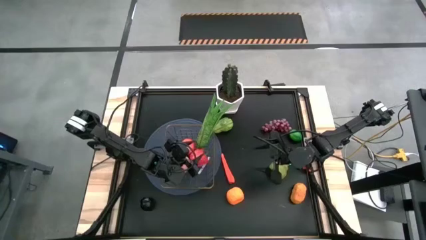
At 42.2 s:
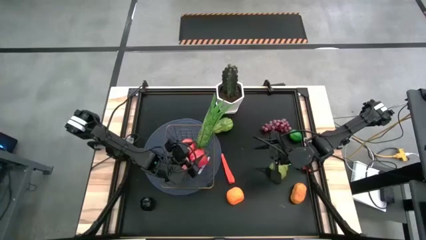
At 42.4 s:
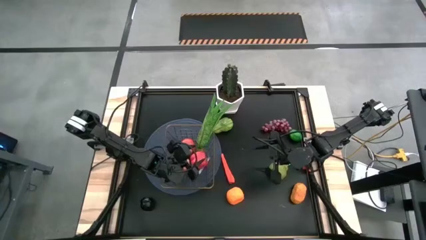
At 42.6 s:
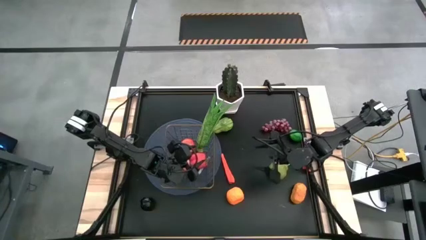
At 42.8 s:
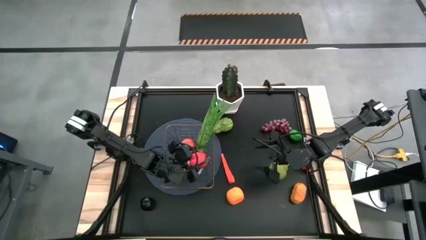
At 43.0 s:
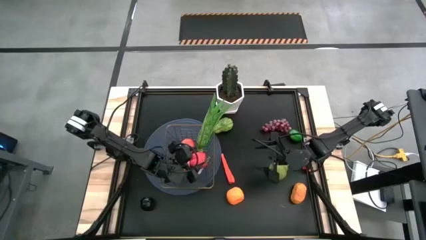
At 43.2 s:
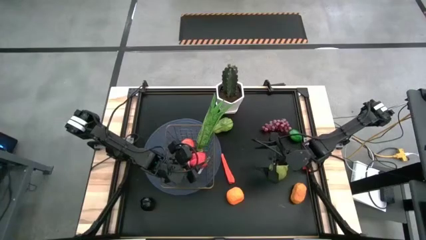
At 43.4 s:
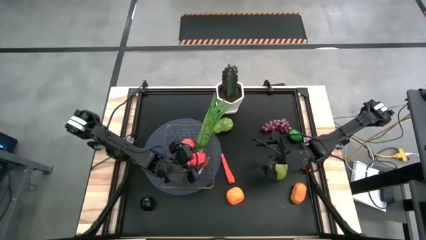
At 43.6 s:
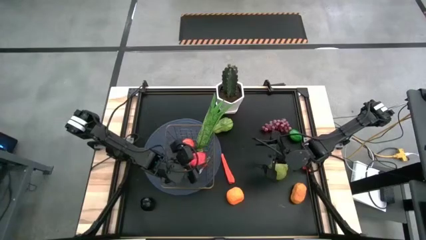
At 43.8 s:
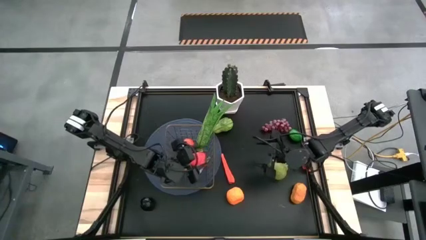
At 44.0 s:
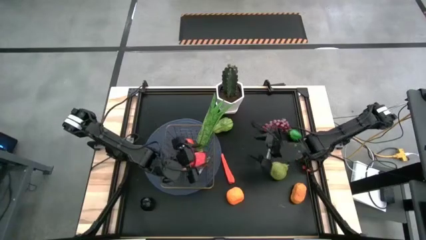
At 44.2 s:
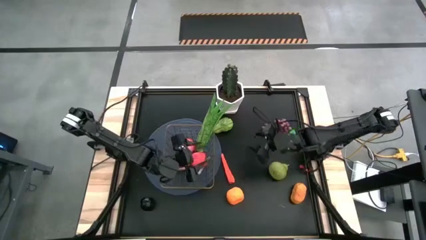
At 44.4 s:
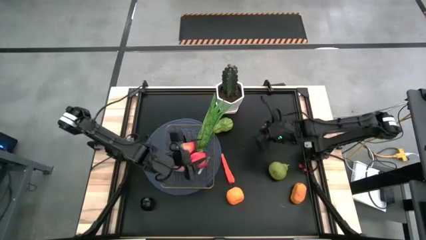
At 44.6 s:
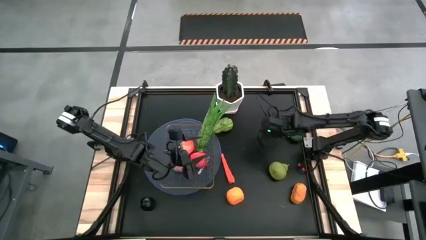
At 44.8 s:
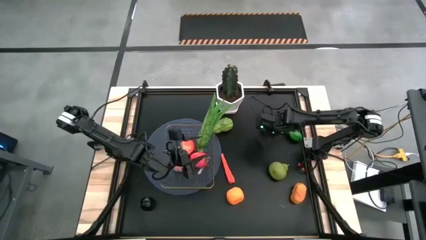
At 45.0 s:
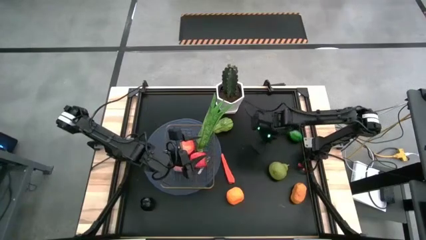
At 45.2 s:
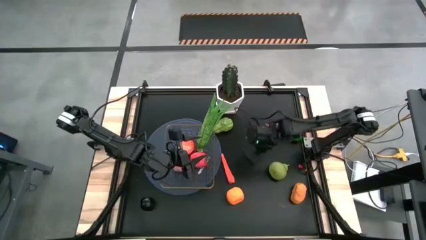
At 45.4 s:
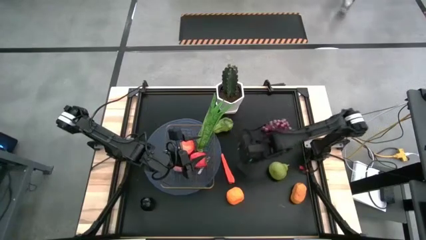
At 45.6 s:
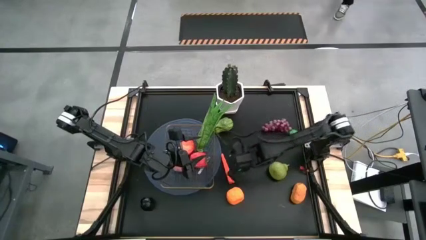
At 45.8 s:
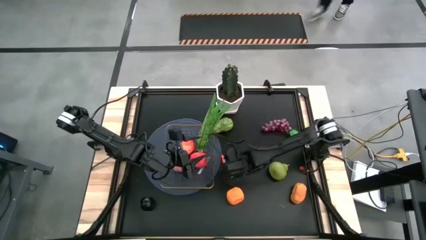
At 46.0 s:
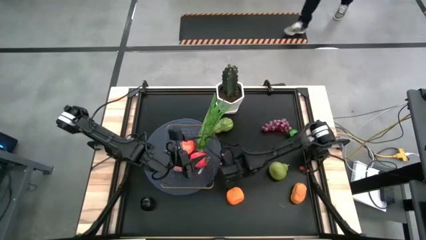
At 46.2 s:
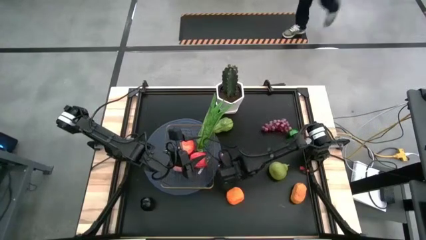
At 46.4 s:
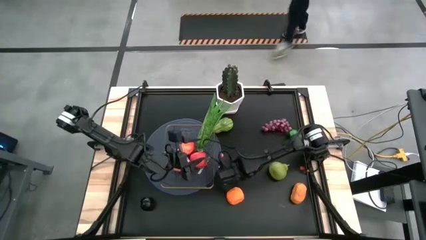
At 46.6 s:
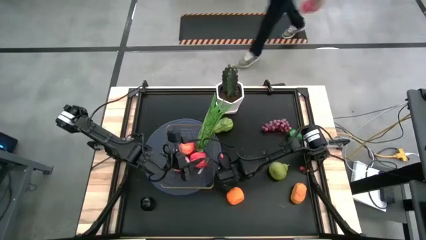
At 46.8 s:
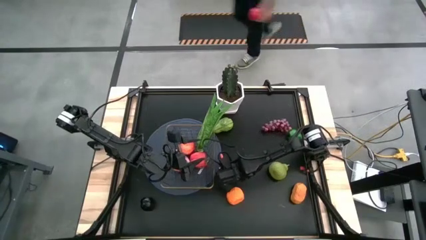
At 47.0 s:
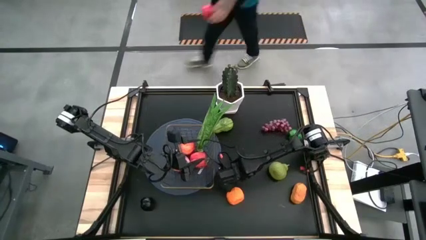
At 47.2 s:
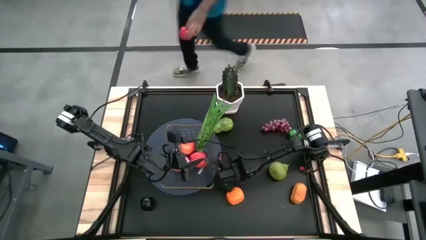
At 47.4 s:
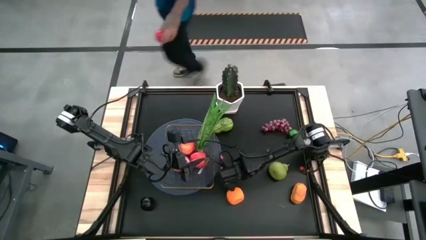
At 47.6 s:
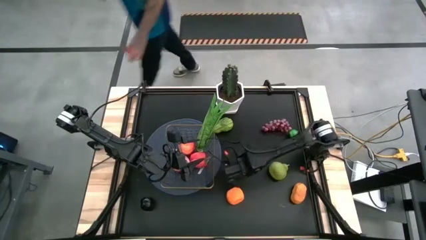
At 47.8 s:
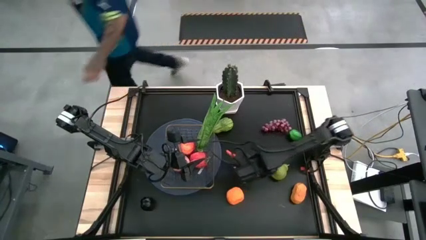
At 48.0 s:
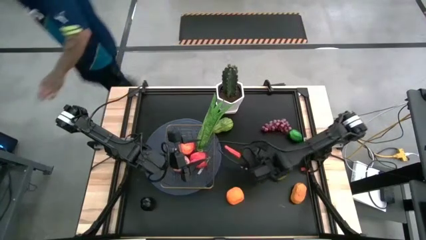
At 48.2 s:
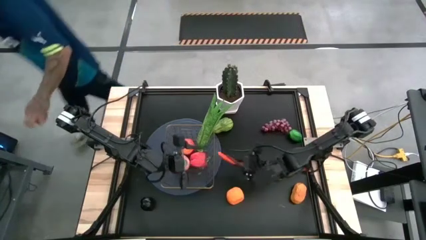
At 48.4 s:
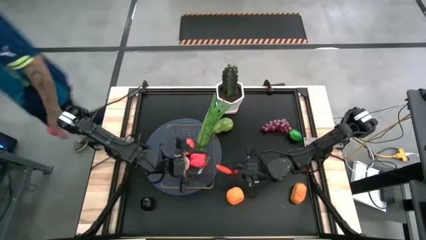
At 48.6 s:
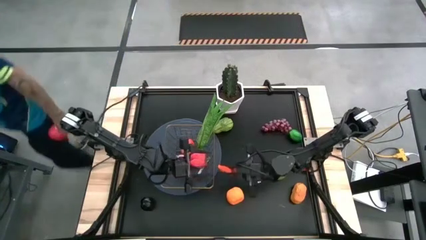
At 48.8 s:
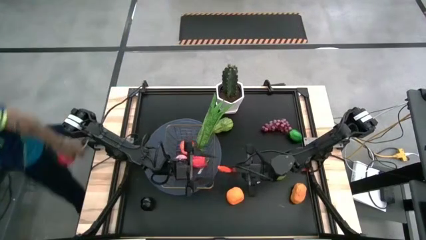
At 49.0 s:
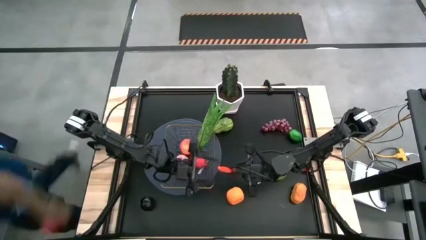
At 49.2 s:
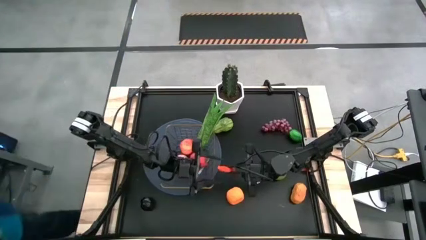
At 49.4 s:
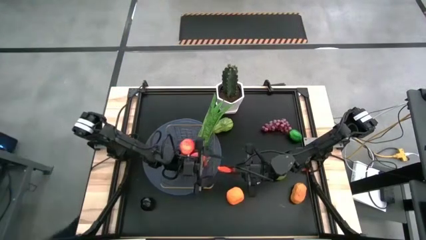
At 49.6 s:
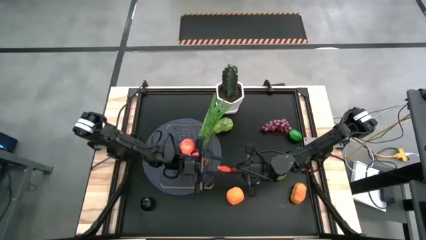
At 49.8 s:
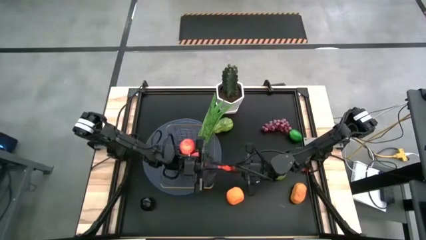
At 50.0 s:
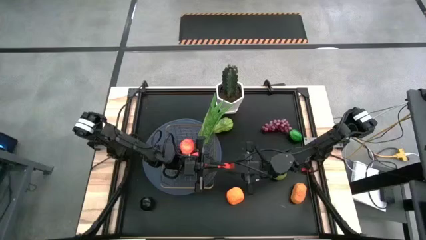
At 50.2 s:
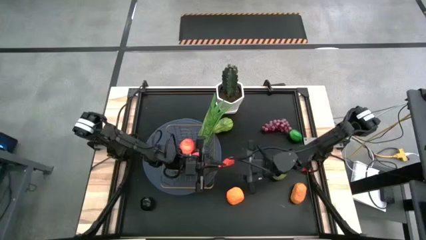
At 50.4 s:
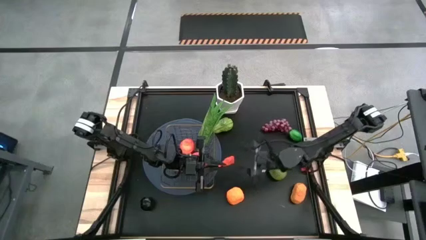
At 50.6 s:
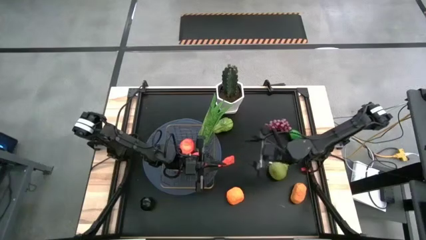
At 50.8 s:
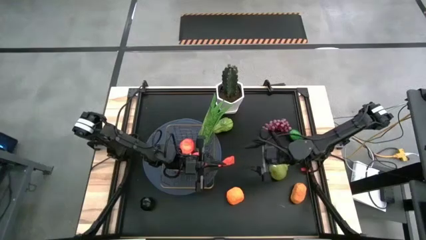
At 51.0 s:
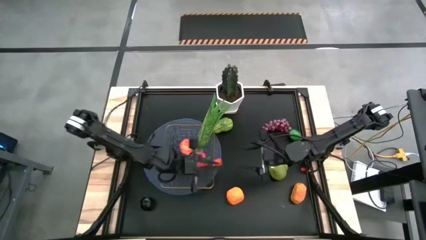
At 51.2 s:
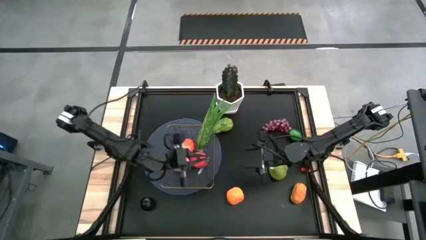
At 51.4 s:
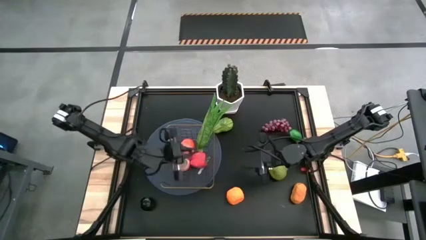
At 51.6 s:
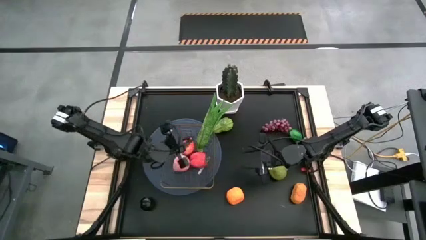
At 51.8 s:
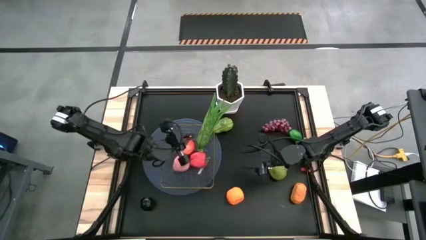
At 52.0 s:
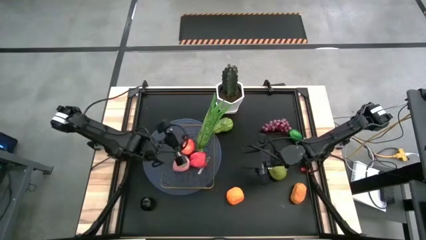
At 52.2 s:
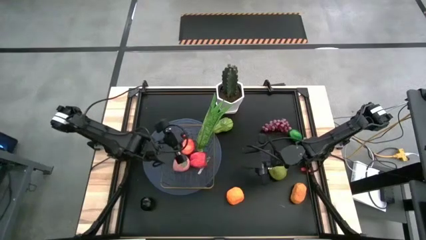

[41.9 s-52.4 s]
Task: Build produce basket
Put the orange carrot into the wire basket

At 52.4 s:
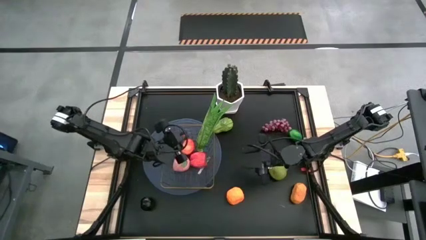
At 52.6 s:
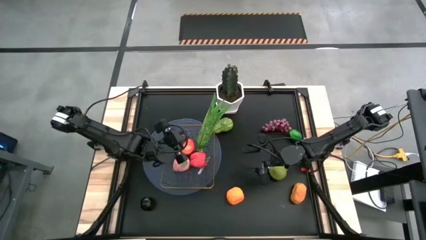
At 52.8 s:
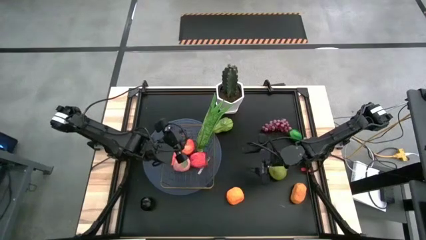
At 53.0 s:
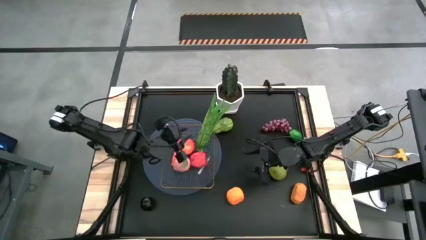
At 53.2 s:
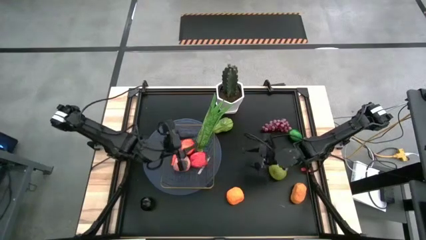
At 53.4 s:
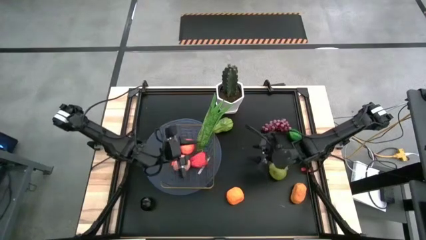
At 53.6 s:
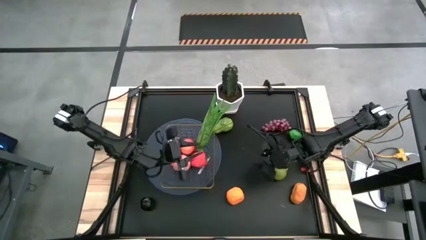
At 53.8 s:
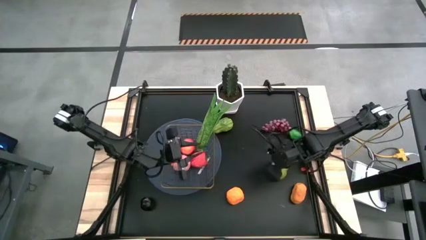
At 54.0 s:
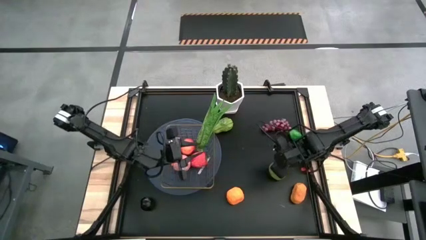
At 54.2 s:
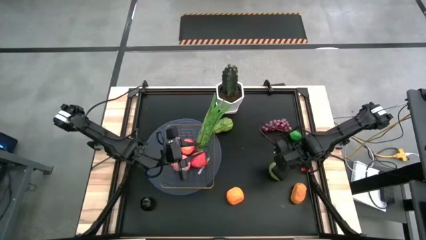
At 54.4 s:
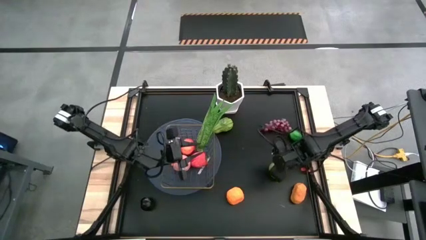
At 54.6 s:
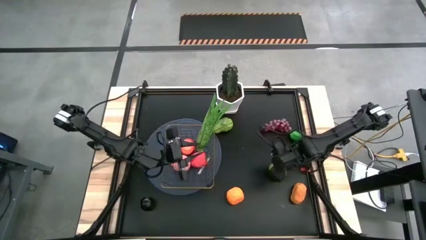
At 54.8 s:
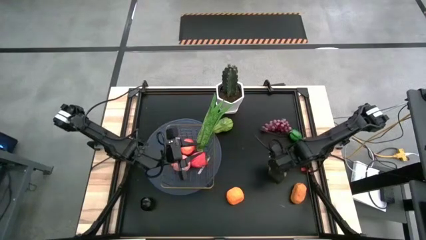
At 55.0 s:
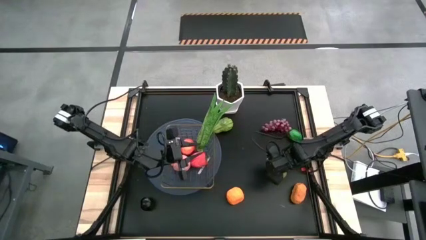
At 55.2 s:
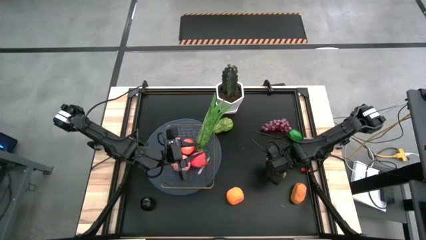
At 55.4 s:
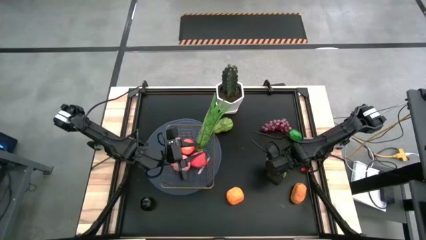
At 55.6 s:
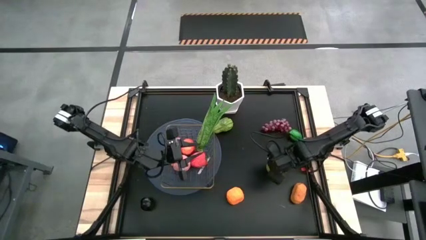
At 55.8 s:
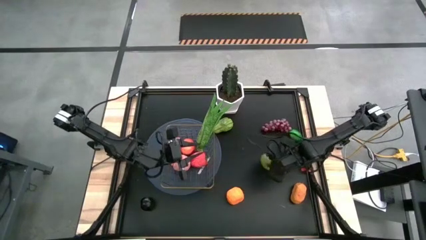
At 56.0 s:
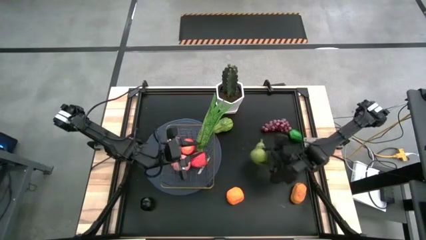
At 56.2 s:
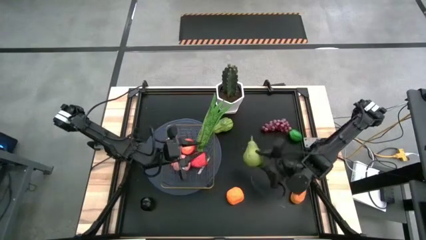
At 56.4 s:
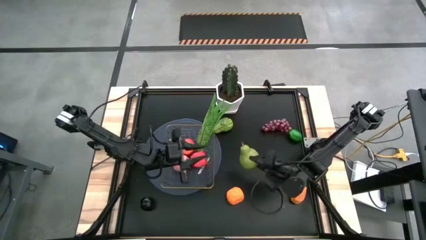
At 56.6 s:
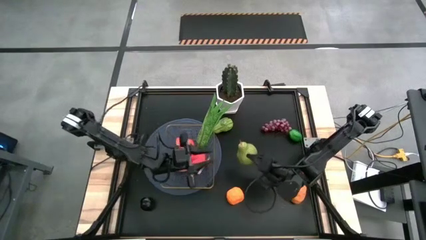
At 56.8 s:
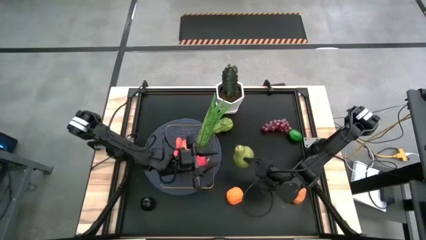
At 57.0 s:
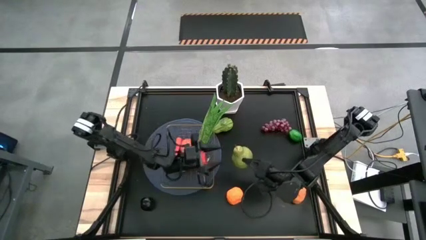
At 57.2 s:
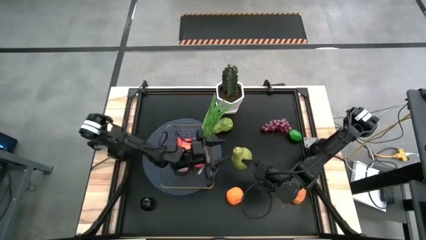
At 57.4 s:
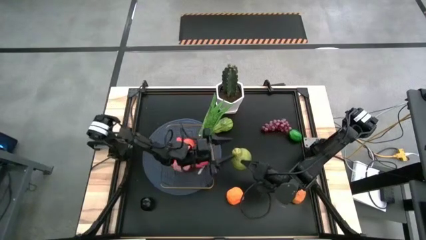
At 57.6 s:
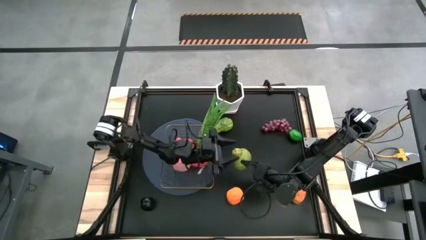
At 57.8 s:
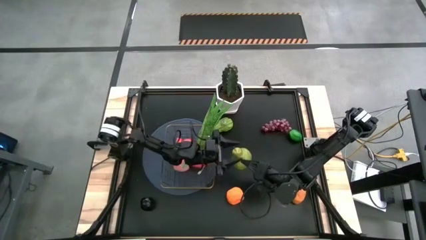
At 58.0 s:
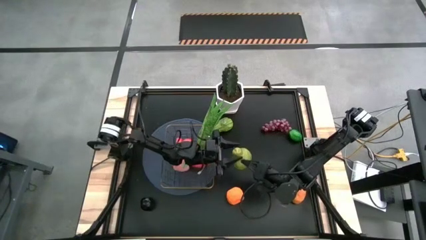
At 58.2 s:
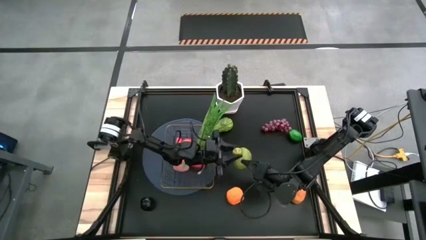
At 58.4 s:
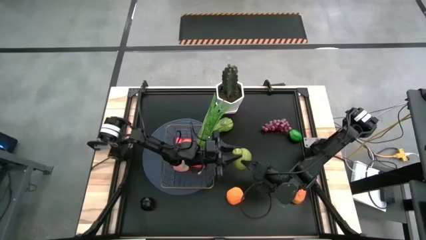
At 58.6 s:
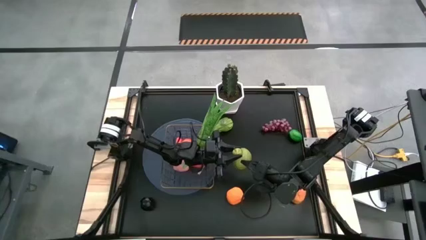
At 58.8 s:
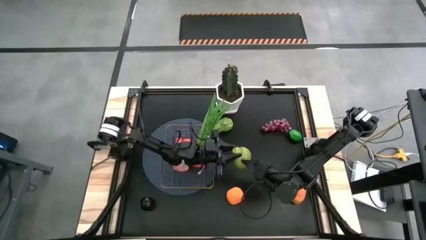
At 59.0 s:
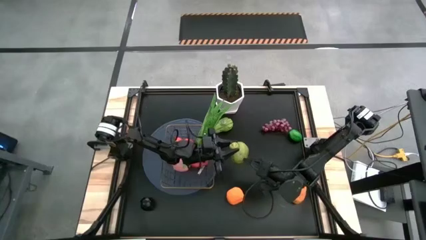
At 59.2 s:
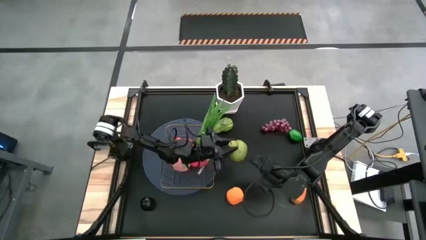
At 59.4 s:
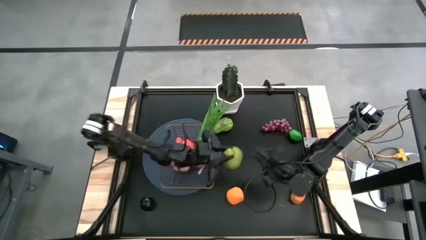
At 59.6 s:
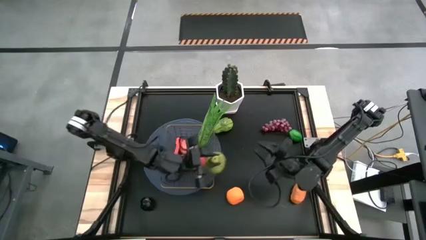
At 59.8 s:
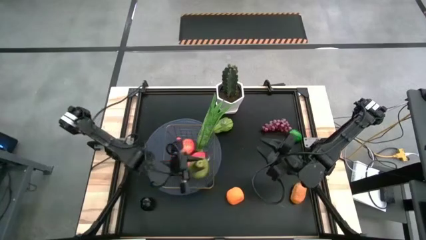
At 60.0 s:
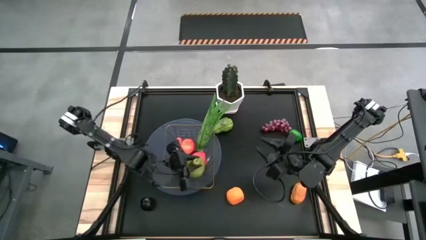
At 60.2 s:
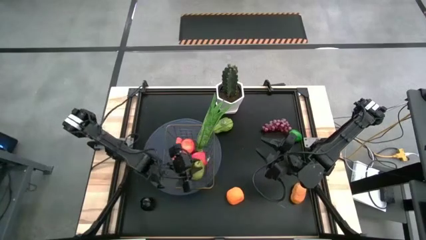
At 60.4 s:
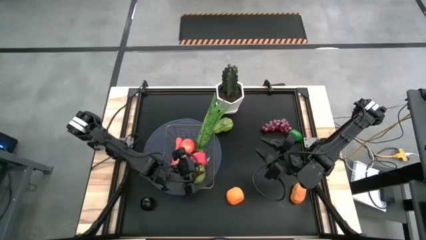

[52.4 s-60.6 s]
Put the green pear into the wire basket
